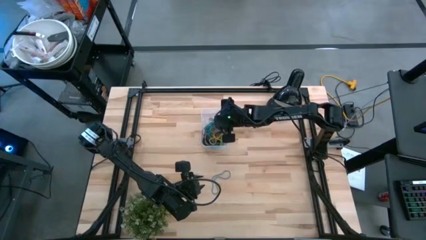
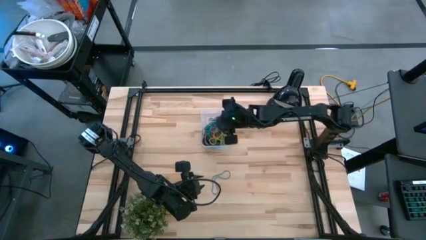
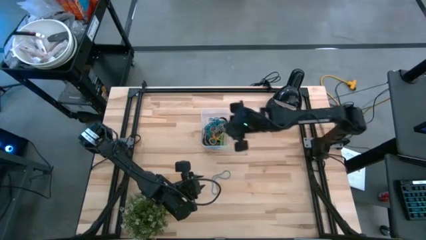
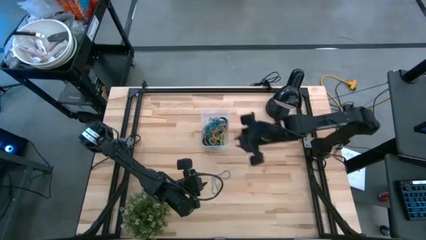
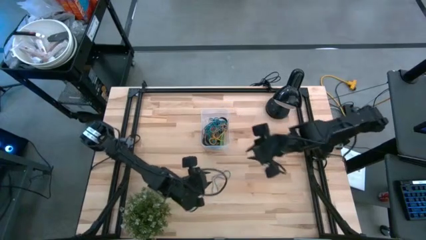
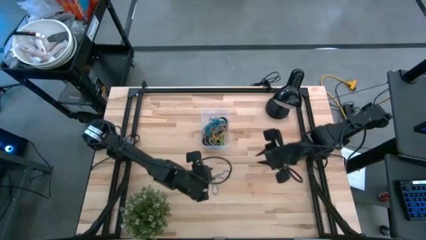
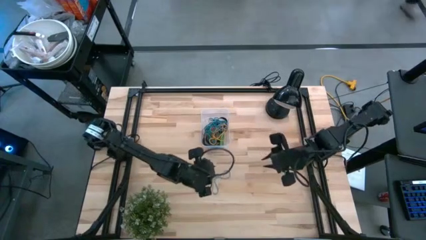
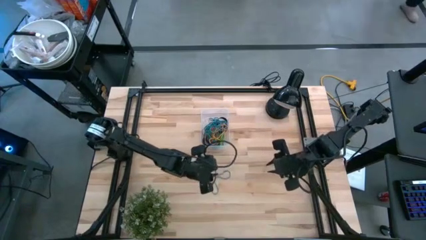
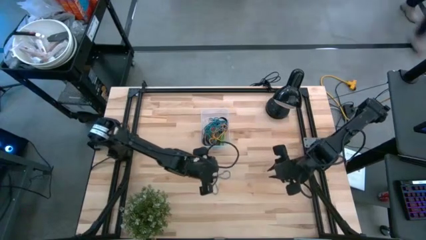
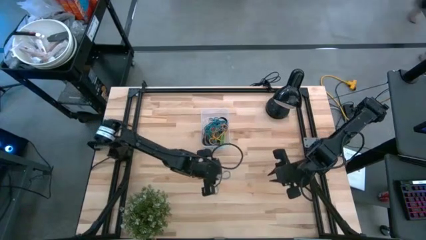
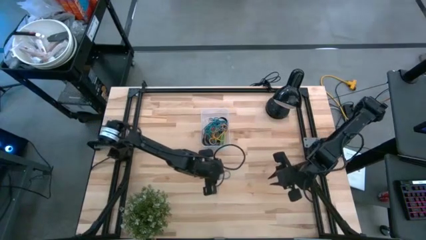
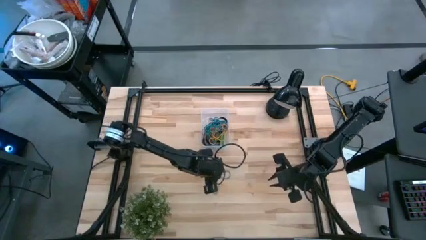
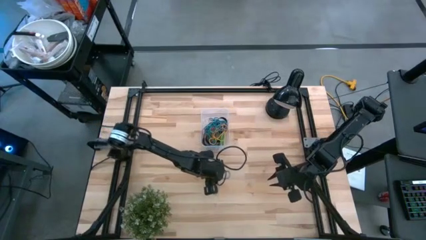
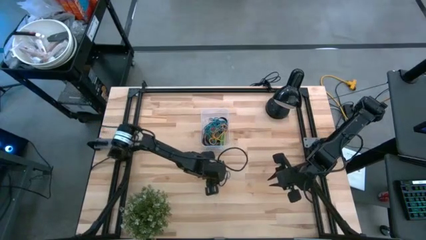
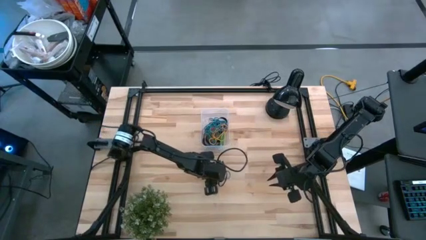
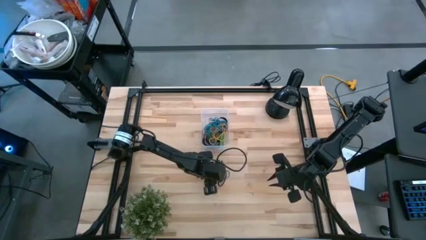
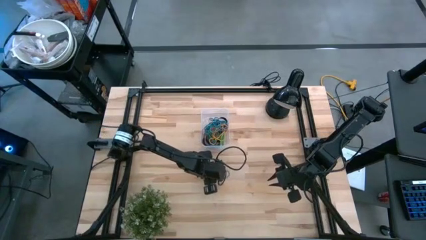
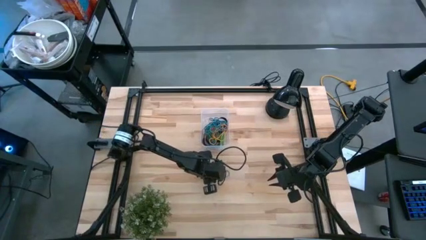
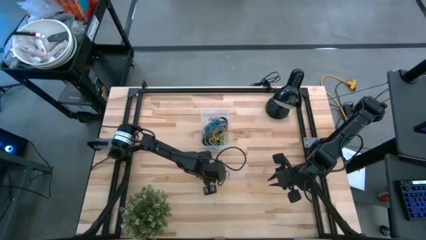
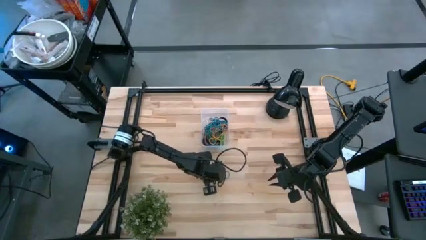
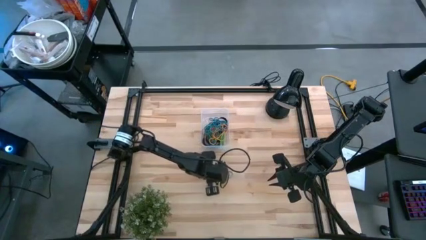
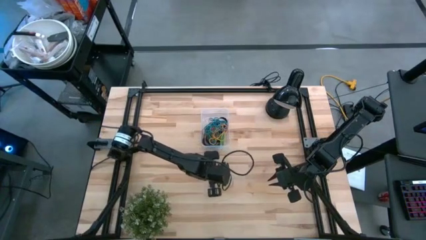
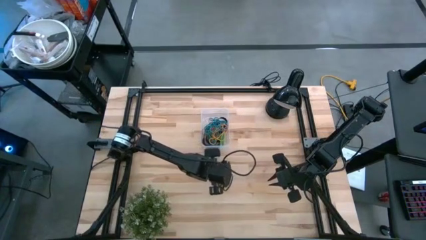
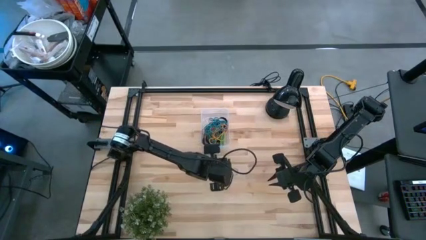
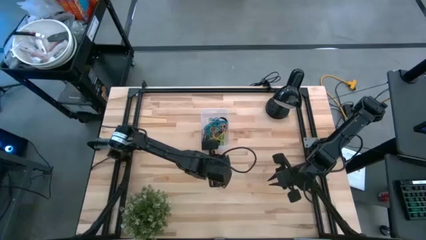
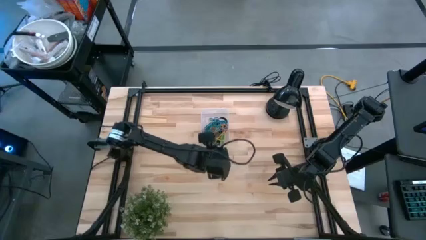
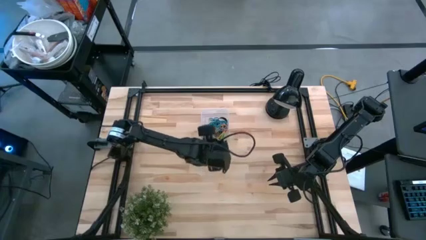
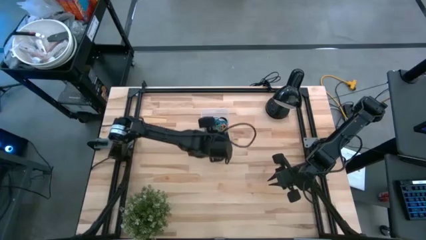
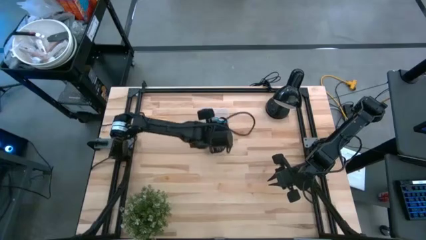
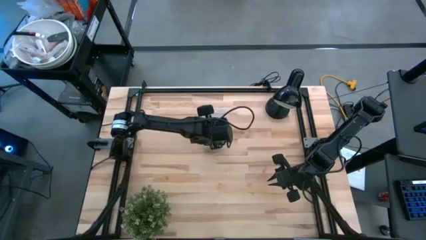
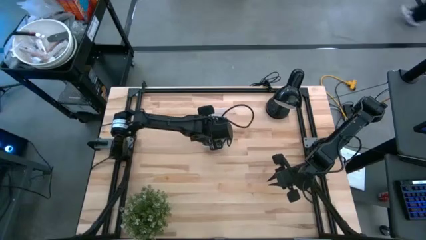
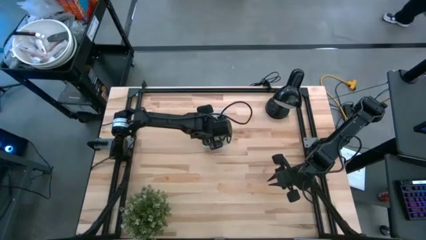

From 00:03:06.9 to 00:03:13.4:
Task: Pick and place rubber bands into bin
Put the blue rubber band into the transparent bin

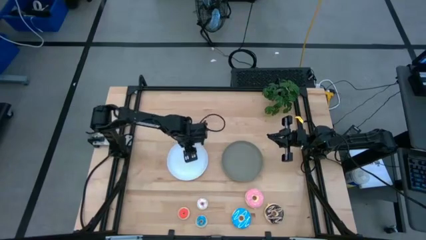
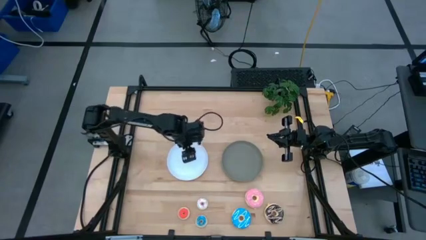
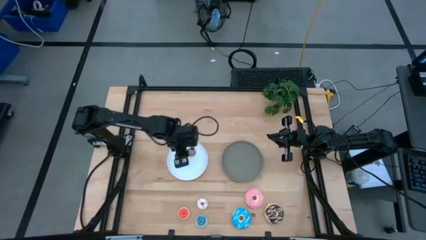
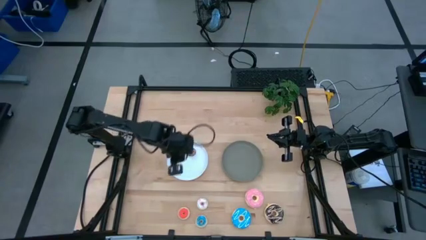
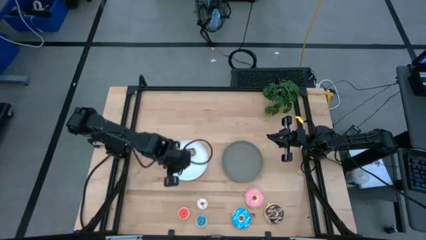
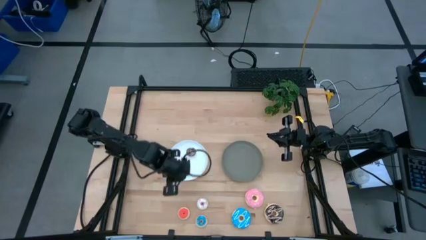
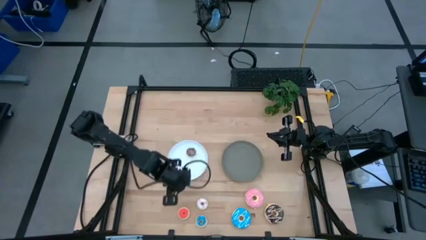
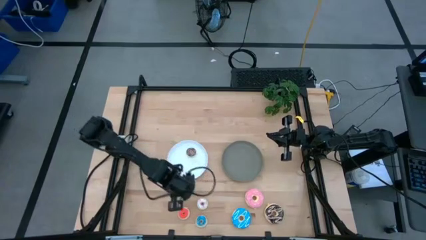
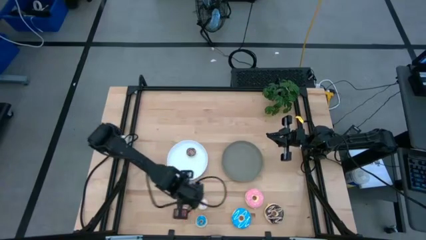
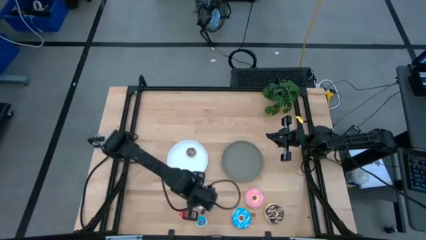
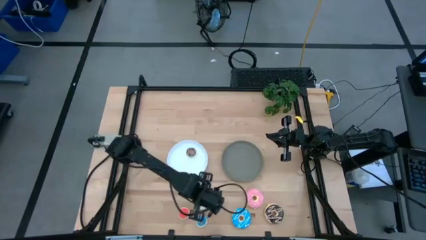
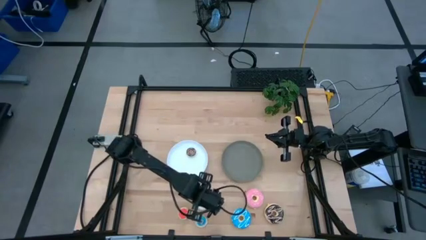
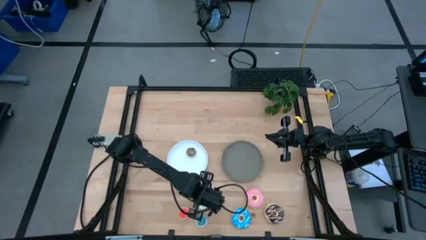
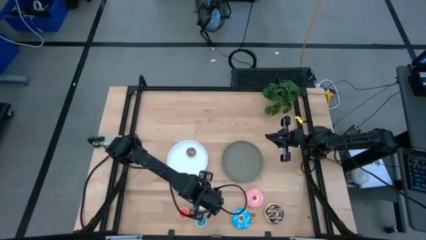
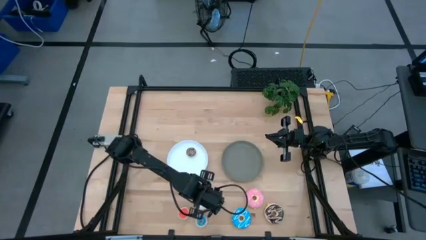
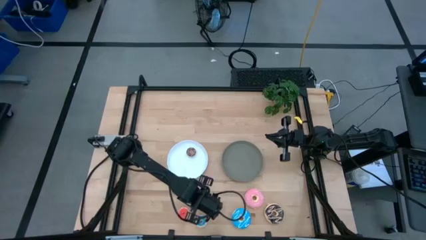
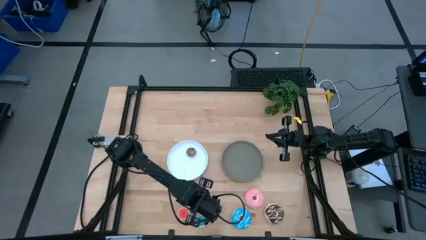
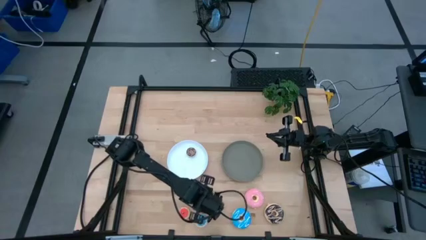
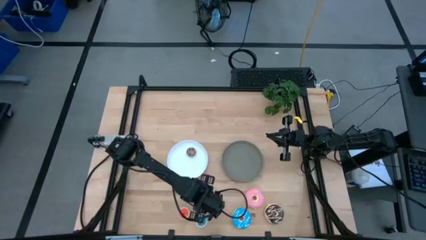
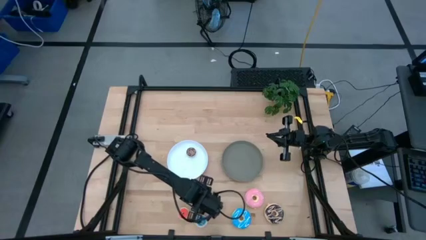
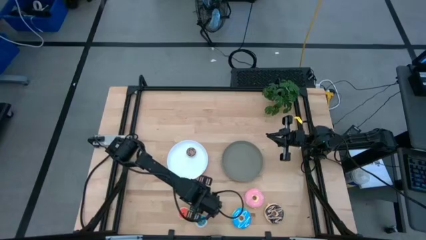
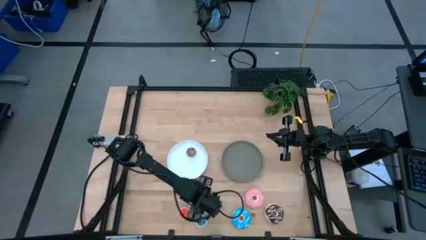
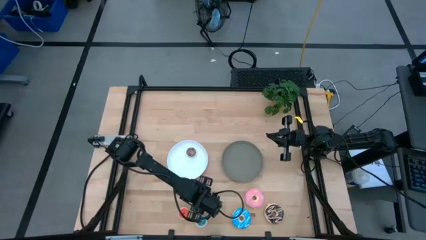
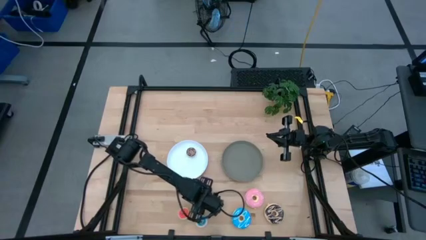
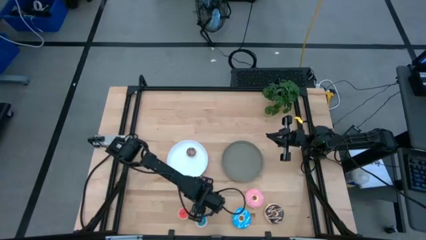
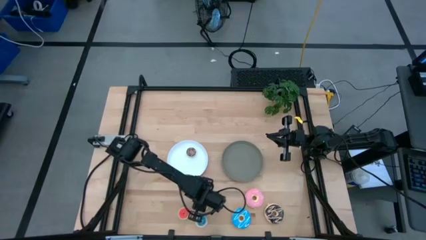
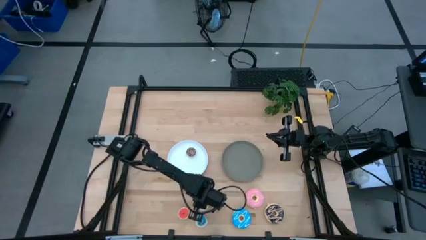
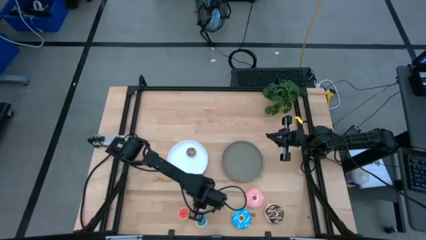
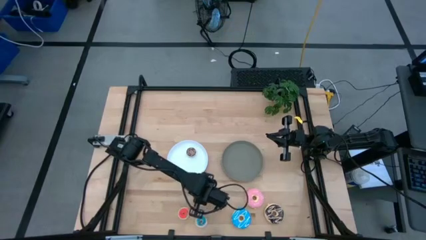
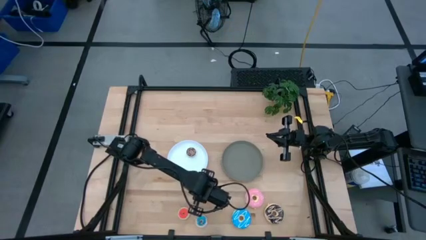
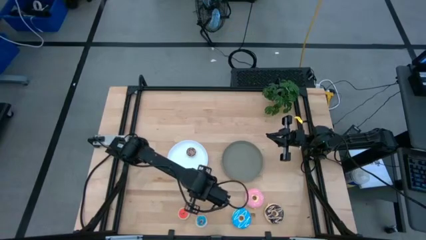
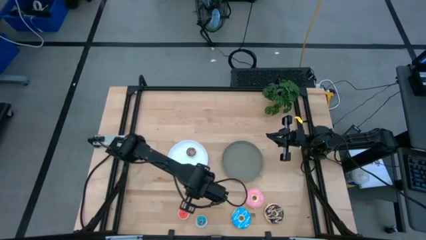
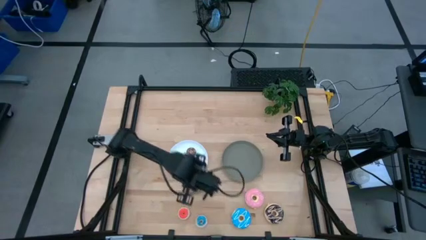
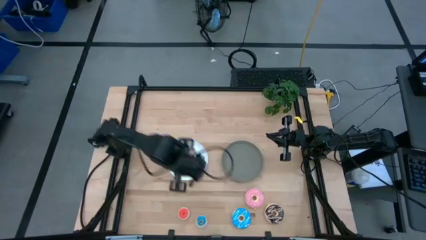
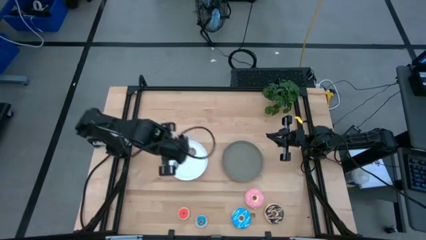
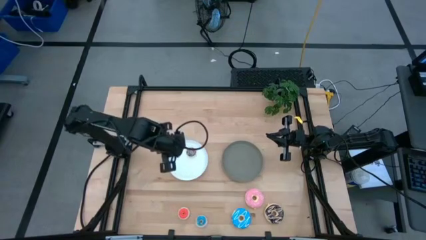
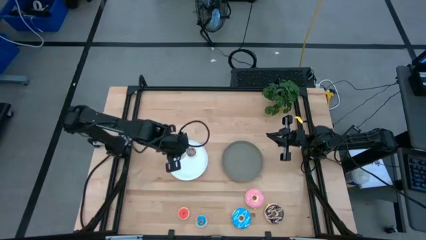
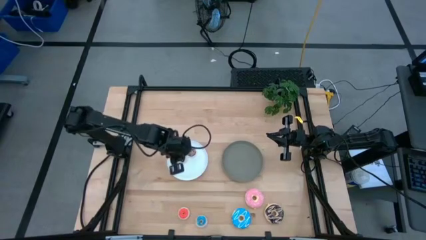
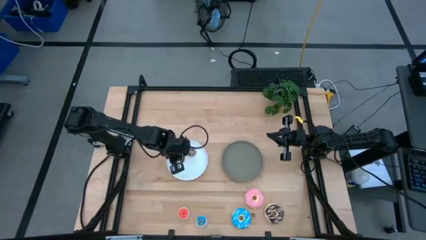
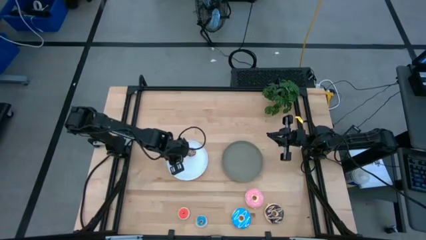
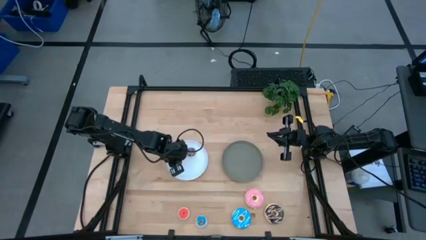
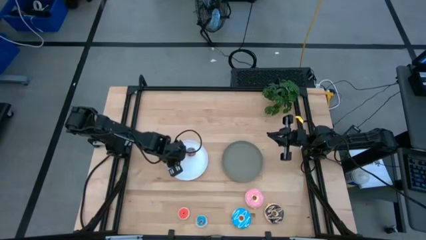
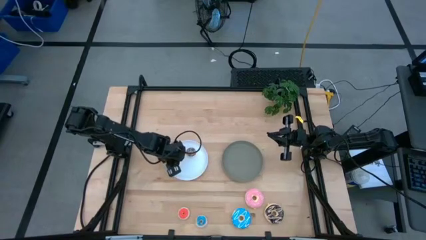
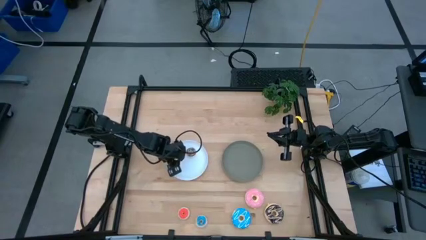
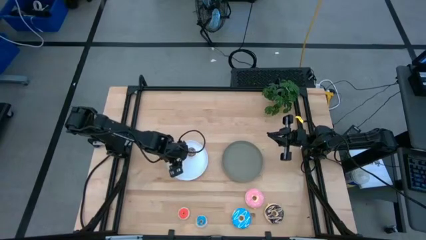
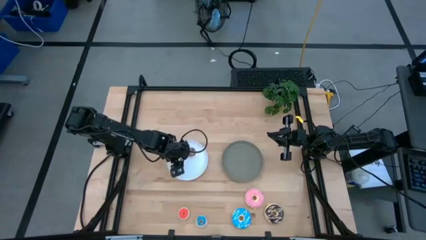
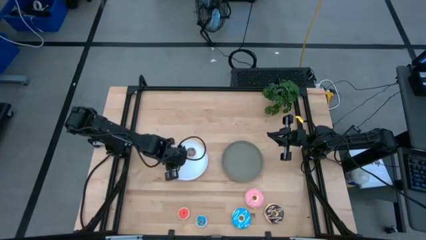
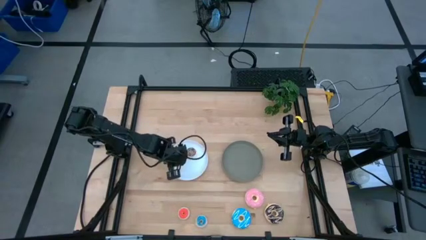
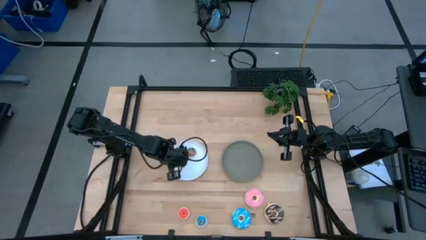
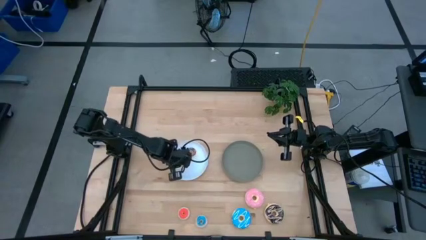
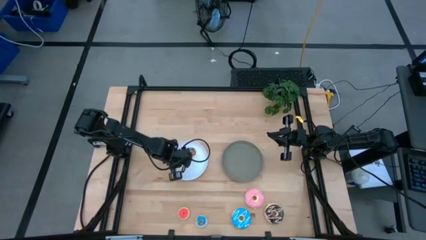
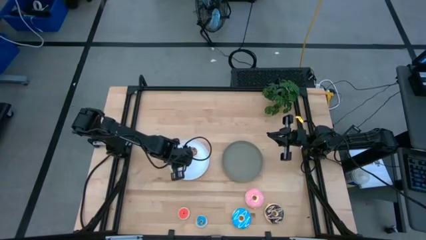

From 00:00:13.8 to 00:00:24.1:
Task: Pick & Place donuts
Put the small white doughnut on the white plate
